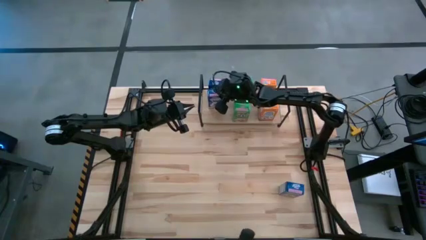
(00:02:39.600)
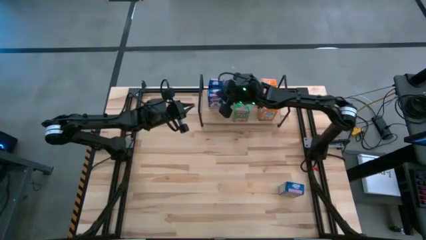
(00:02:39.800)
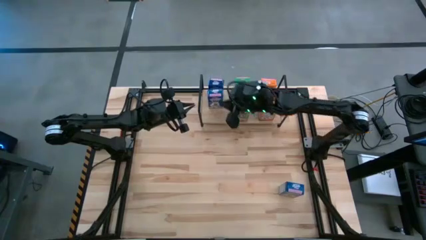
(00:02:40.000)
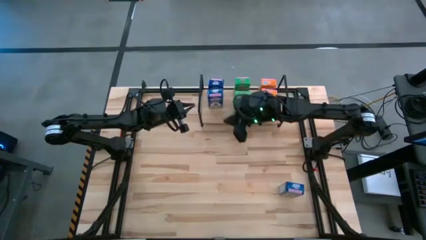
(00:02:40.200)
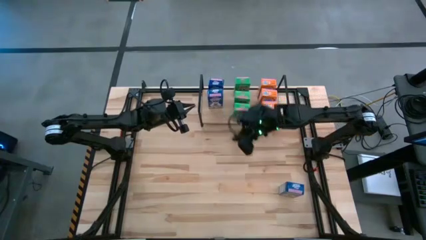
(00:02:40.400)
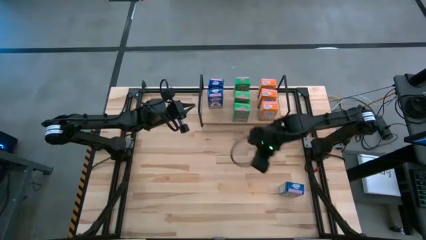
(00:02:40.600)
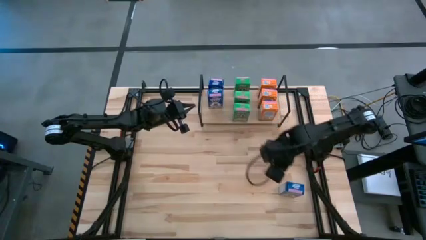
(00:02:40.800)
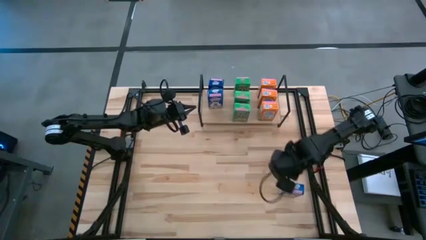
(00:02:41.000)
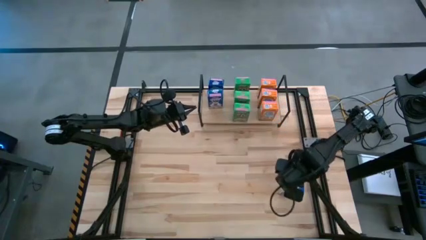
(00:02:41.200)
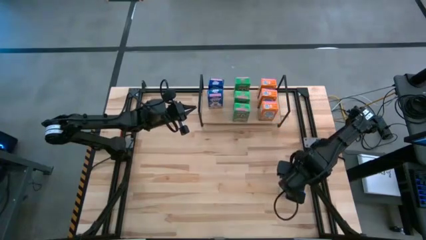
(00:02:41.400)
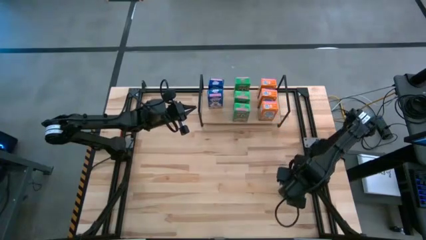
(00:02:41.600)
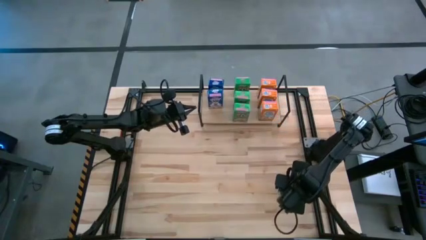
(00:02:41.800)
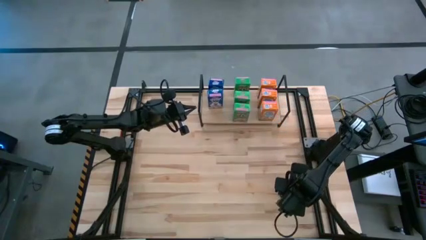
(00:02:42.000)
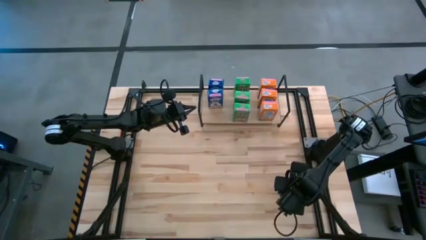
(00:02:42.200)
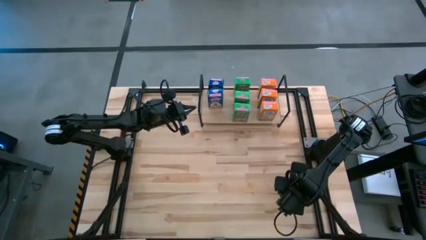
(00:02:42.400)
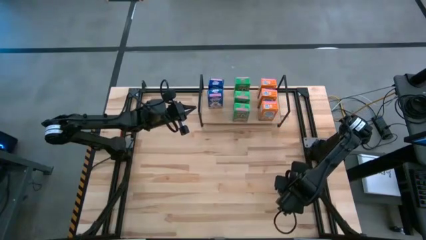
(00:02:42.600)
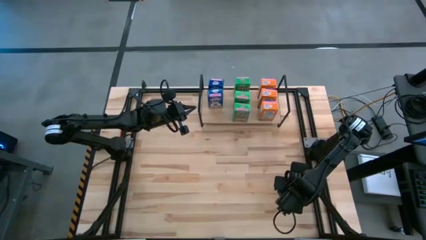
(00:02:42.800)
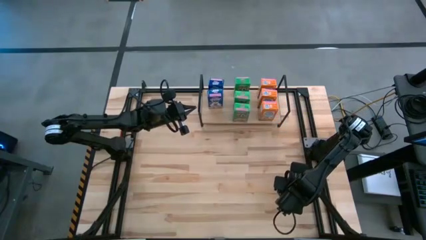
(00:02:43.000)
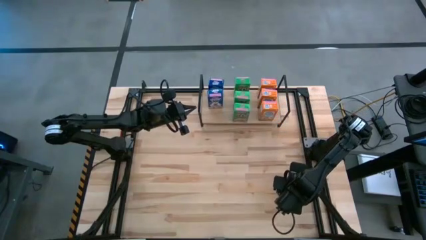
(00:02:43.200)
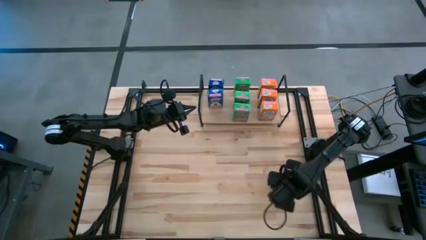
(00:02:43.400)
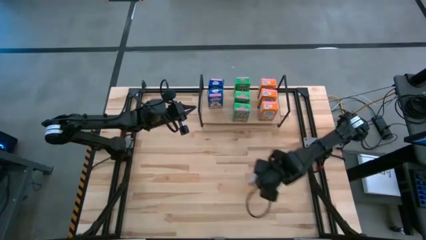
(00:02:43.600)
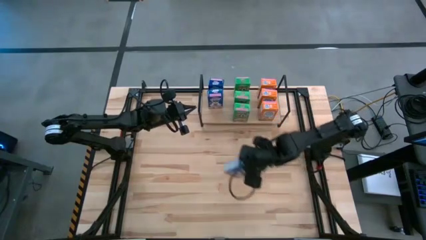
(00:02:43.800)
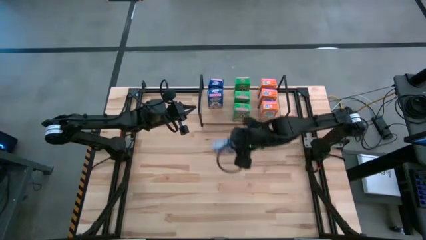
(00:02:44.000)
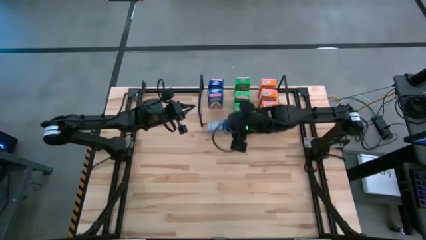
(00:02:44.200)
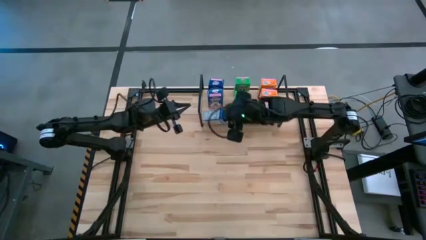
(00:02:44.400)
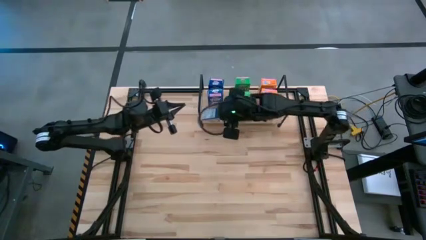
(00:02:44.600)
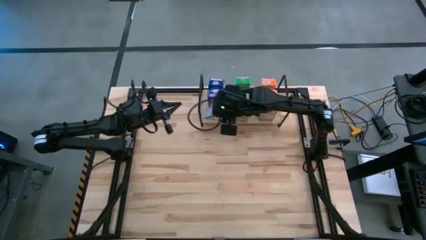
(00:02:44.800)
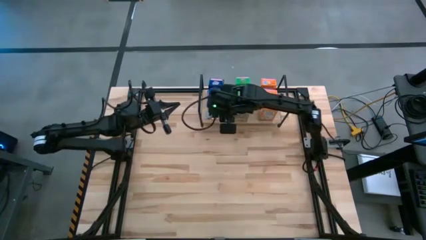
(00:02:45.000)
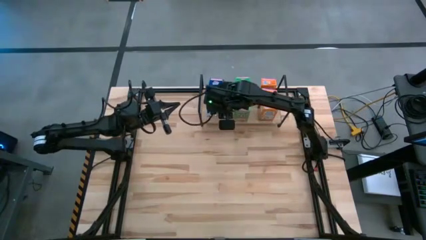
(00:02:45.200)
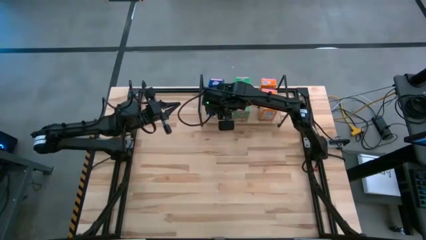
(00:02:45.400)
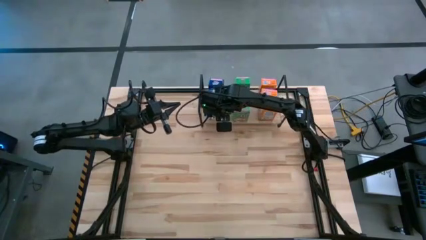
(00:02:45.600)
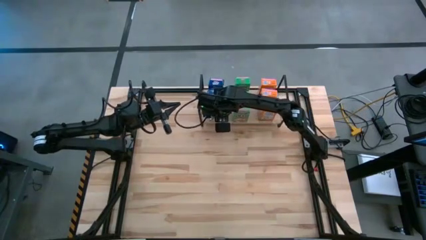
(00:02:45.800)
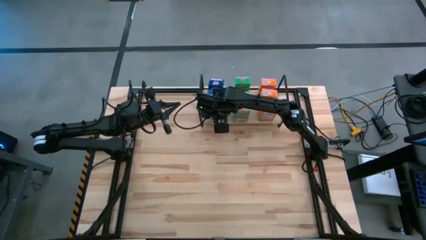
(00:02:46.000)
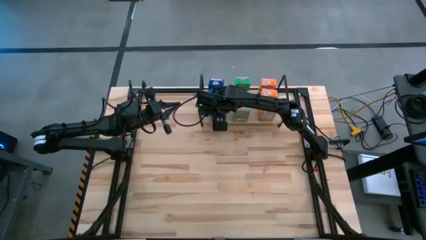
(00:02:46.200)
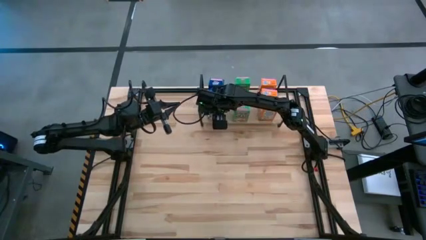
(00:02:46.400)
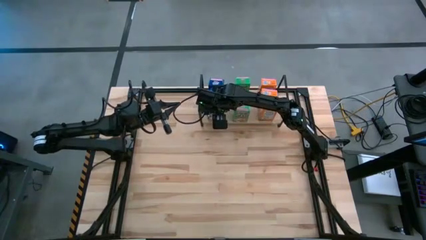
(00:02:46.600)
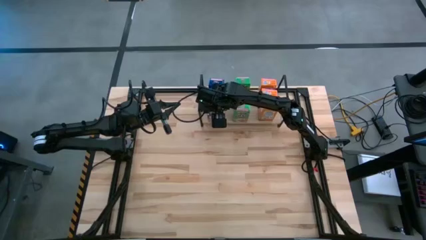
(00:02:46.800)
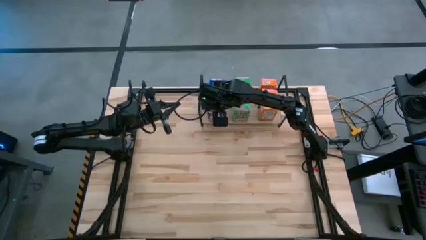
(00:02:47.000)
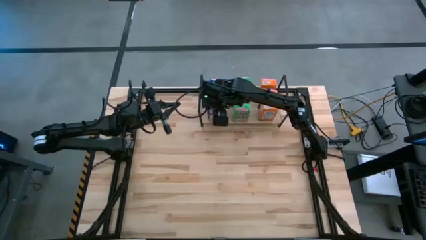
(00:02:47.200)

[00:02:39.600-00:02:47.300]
Task: Stack cereal on shelf
Put the blue cereal box aligned with the other green cereal boxes on the shelf

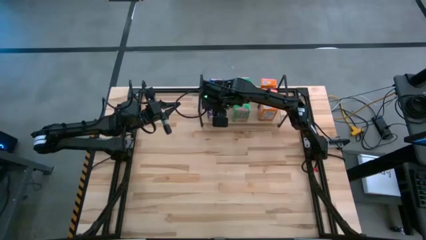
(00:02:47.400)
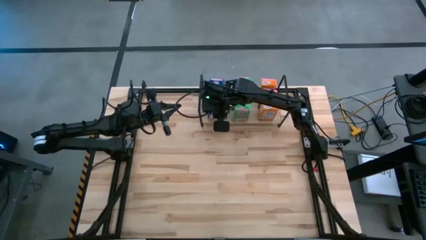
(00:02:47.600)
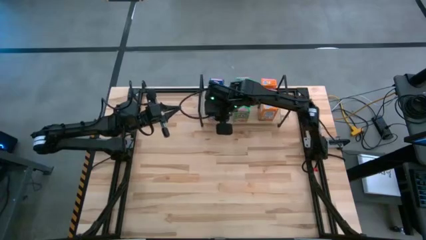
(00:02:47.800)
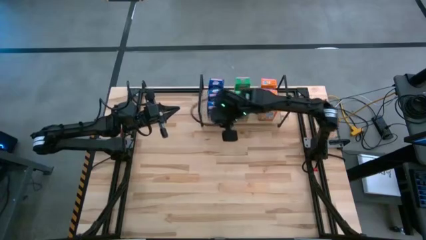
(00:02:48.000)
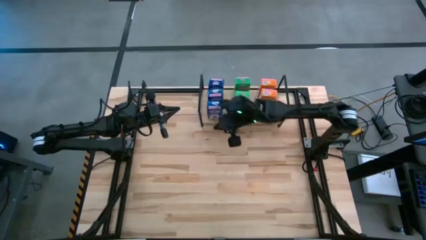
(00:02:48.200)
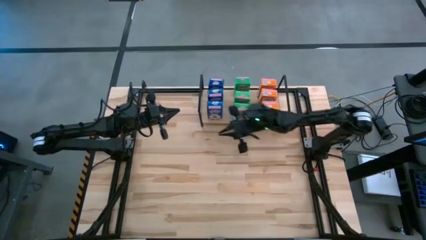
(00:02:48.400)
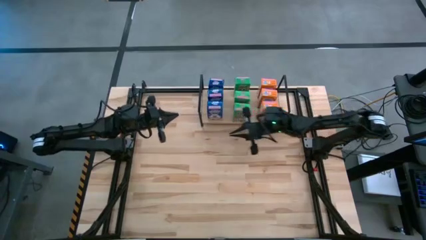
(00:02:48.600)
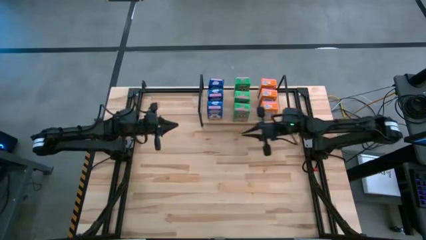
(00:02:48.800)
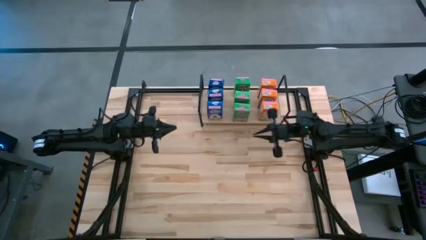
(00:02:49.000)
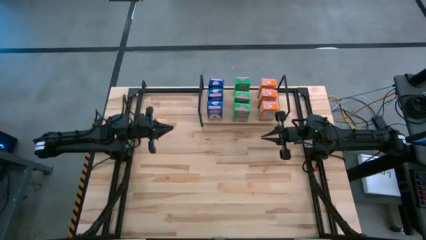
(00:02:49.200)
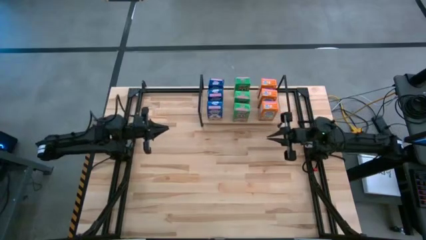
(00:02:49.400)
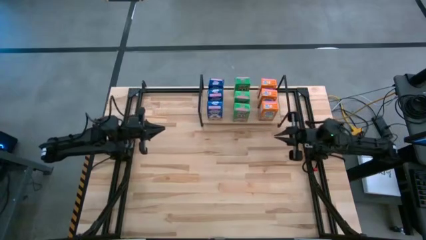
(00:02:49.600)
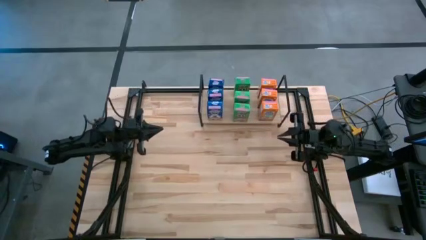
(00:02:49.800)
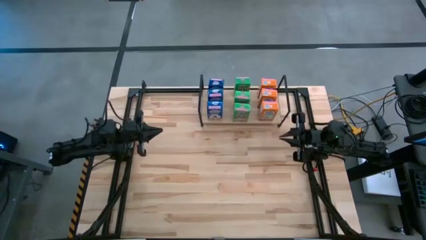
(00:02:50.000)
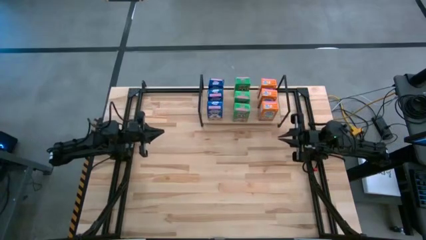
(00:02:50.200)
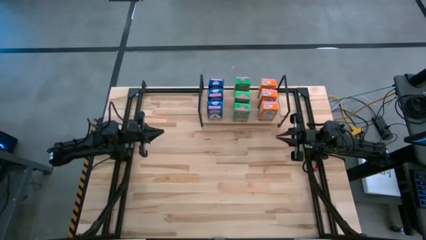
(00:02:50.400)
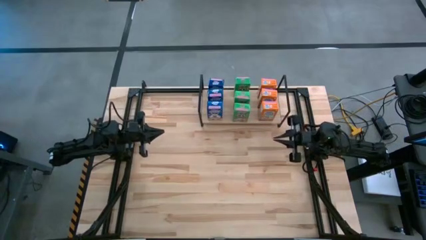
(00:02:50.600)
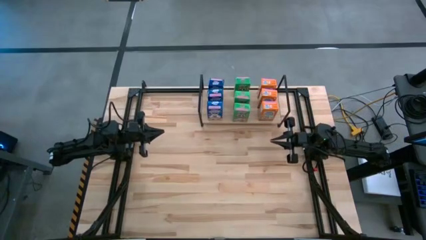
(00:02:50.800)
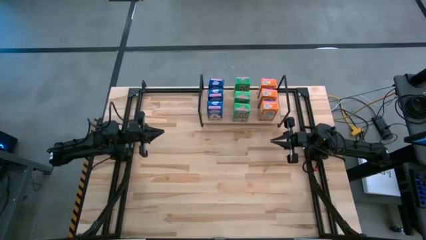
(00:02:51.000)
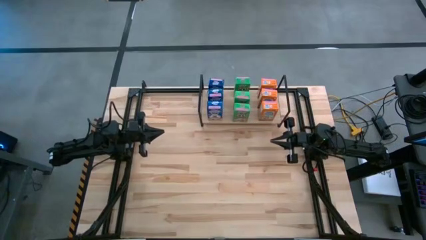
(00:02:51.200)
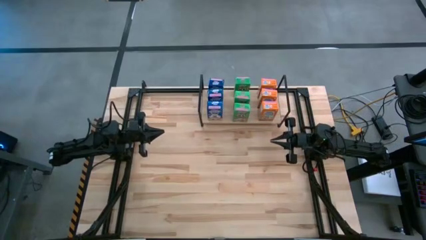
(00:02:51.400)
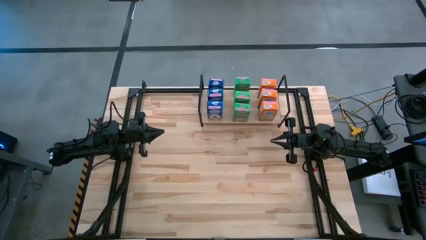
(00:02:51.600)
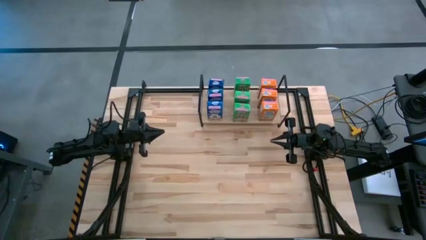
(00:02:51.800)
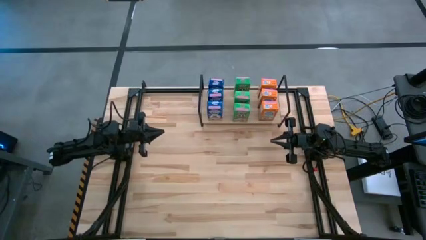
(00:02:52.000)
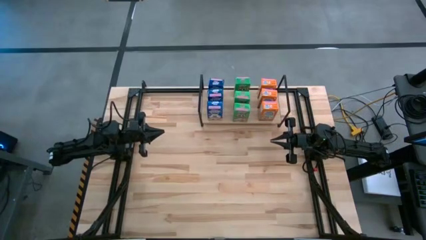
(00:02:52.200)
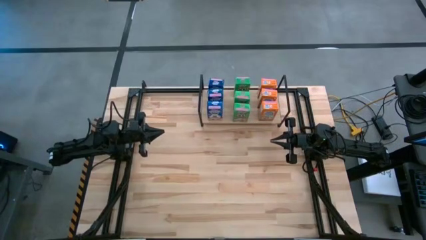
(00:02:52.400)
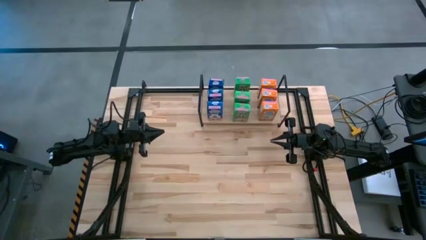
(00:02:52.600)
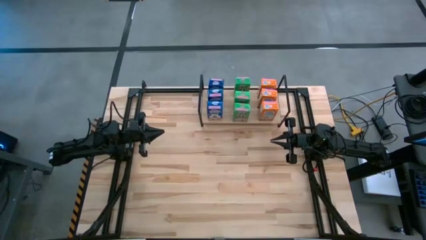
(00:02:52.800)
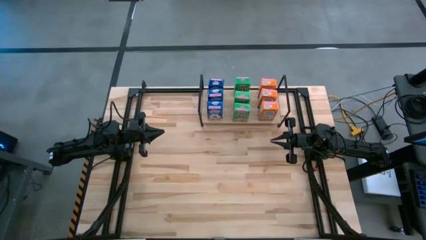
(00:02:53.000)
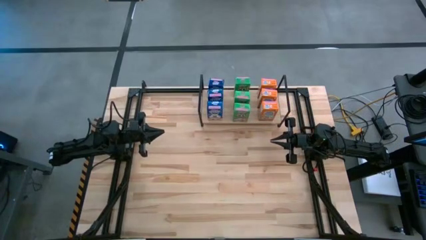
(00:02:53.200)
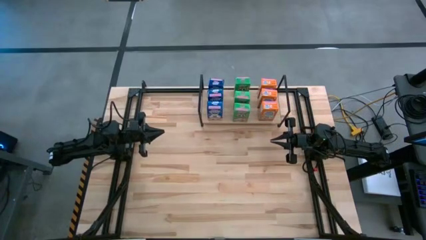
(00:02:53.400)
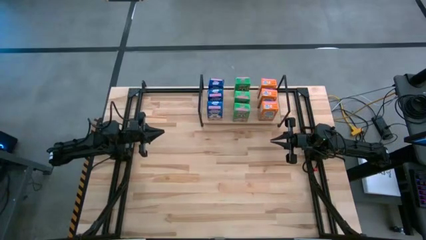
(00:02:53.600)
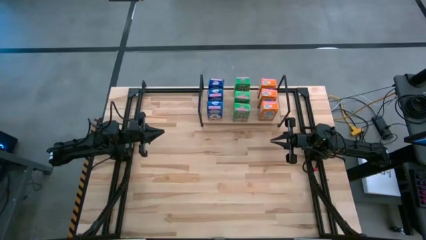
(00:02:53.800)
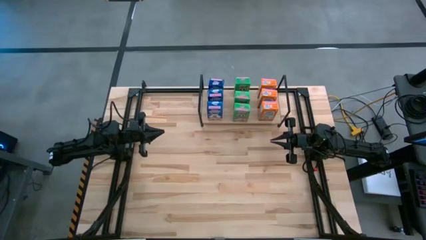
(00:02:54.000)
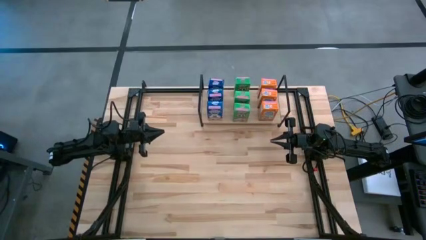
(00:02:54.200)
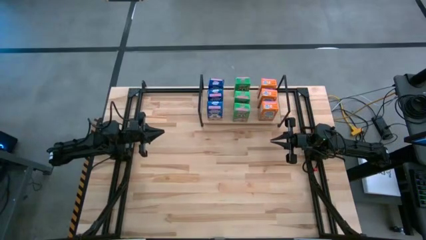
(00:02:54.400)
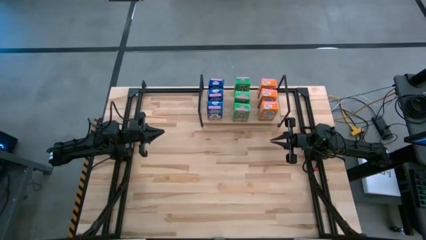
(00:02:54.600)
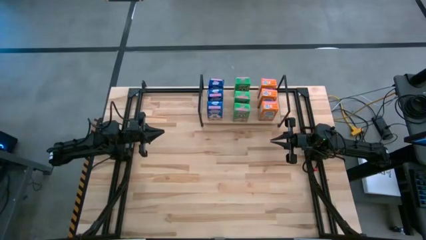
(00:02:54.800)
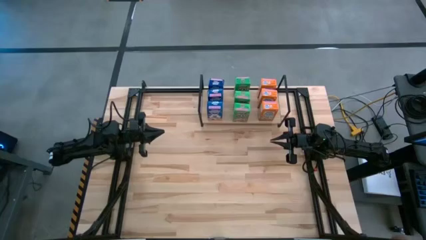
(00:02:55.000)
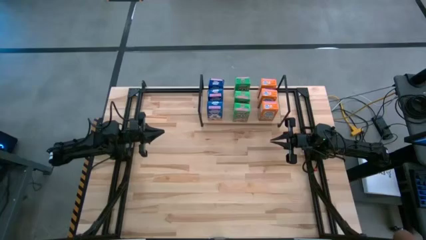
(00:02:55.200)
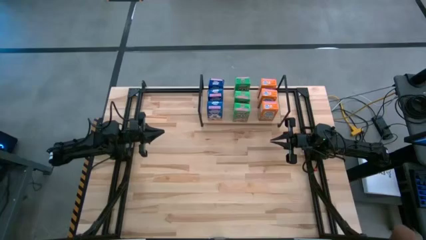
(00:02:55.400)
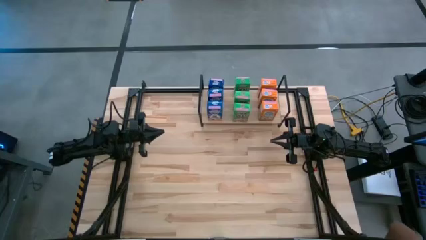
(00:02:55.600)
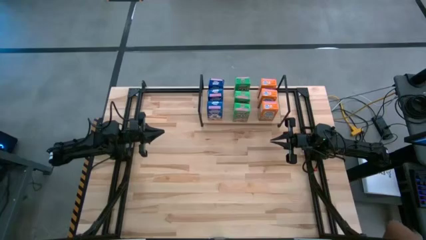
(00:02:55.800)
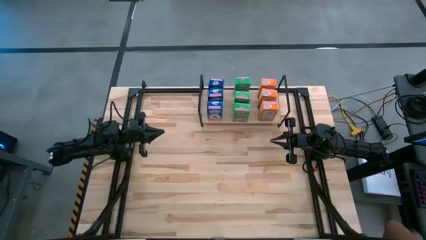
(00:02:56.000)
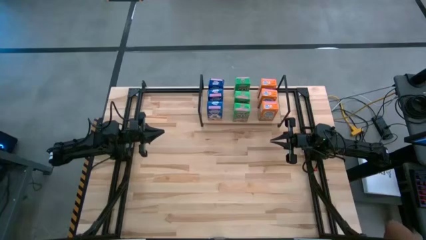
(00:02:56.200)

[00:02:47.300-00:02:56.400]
Return to Home Position
